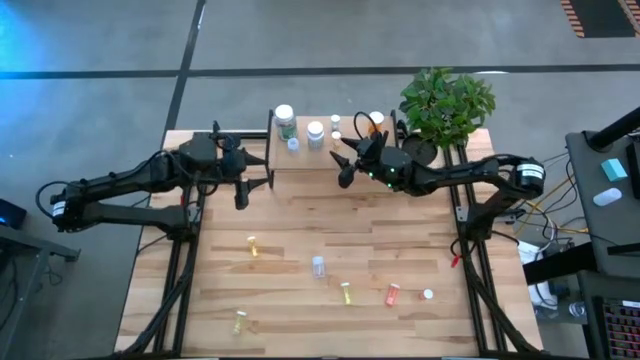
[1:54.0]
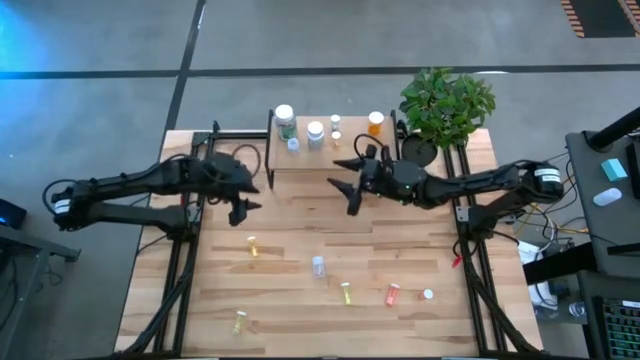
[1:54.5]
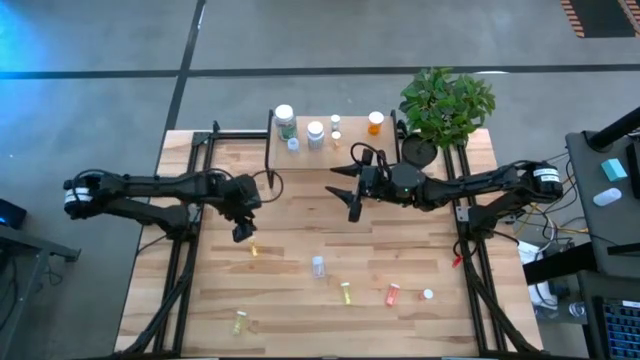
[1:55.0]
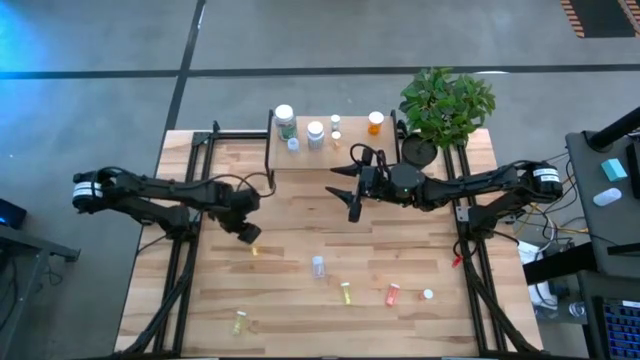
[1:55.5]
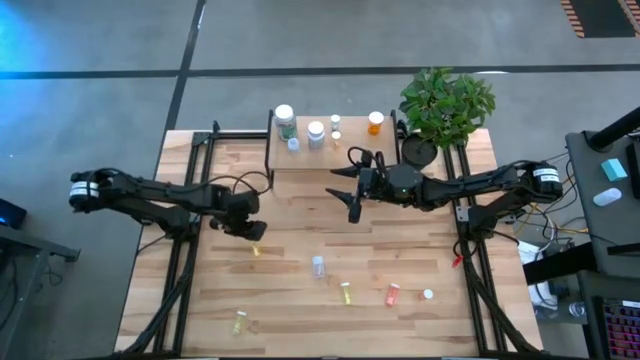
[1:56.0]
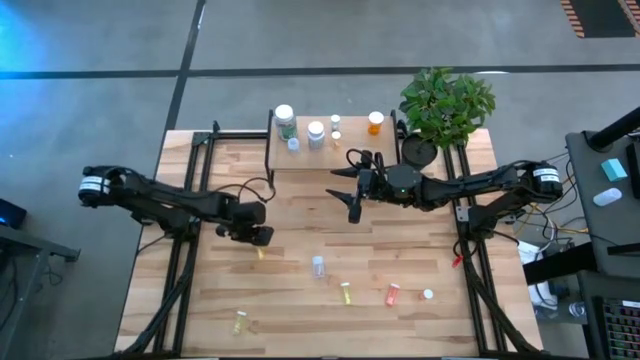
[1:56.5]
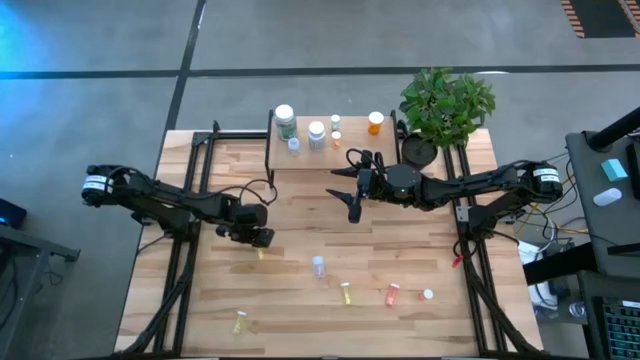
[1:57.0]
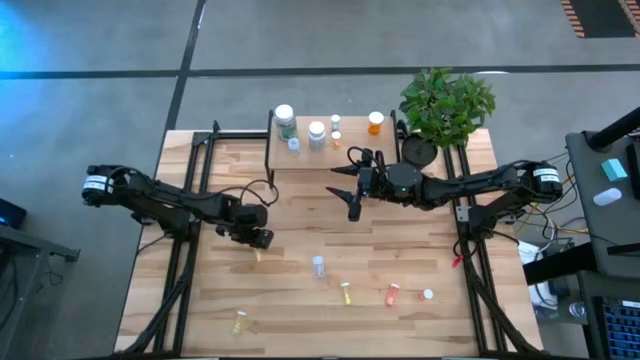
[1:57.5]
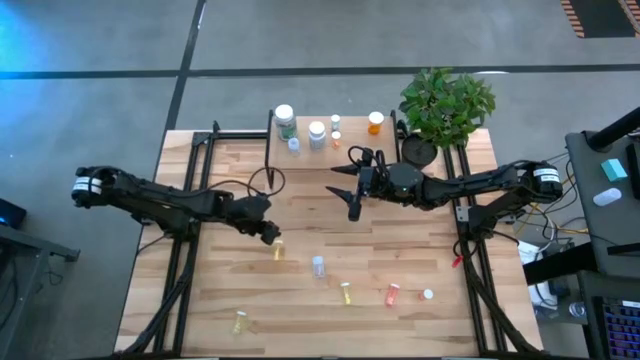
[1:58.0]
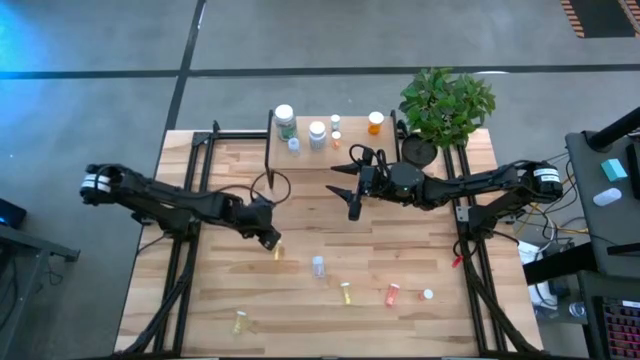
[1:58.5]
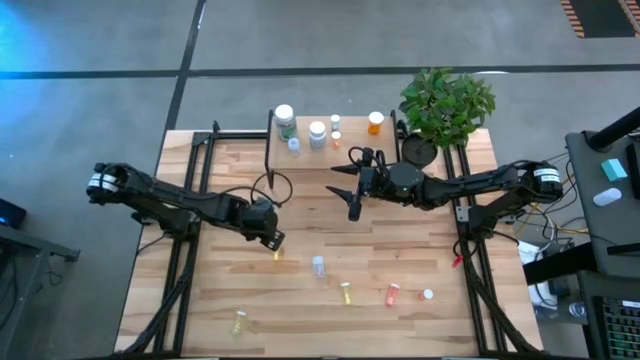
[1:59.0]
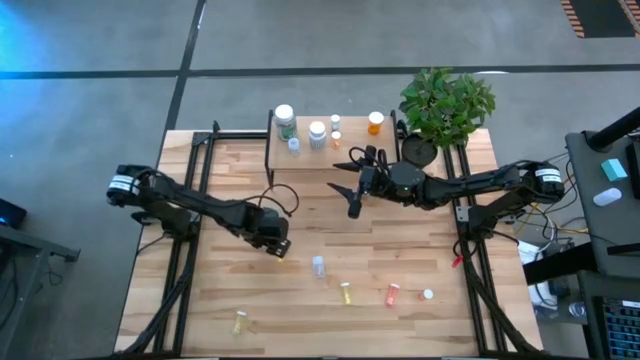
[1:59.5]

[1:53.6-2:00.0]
Task: Pick and place medicine bottles onto shelf by color
Put the yellow pill bottle on the shelf

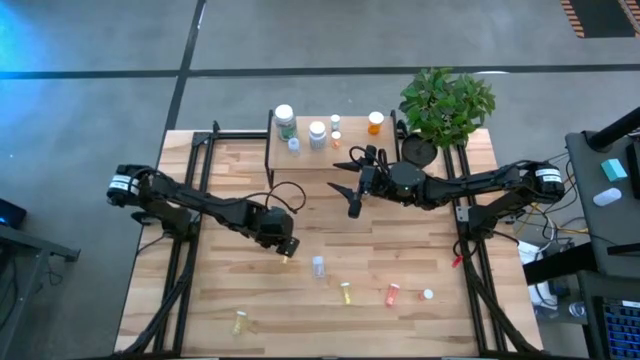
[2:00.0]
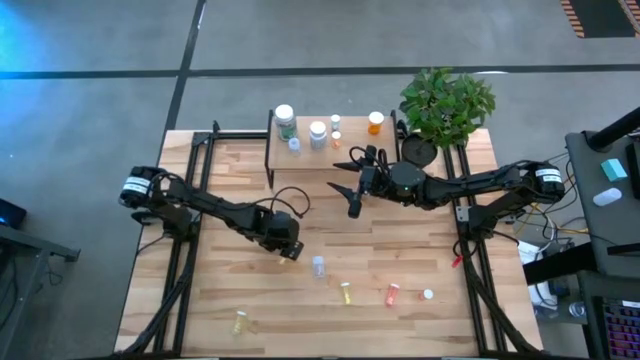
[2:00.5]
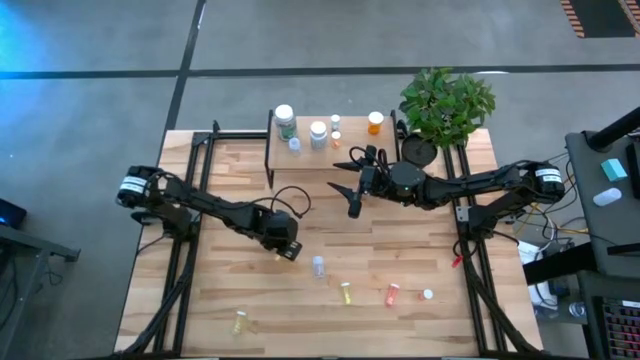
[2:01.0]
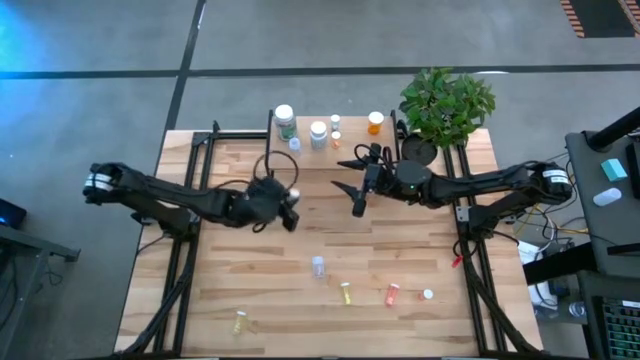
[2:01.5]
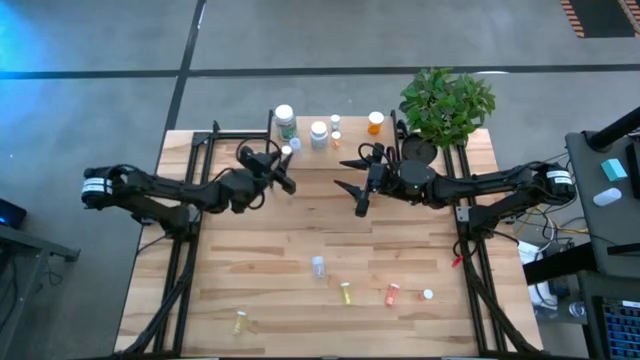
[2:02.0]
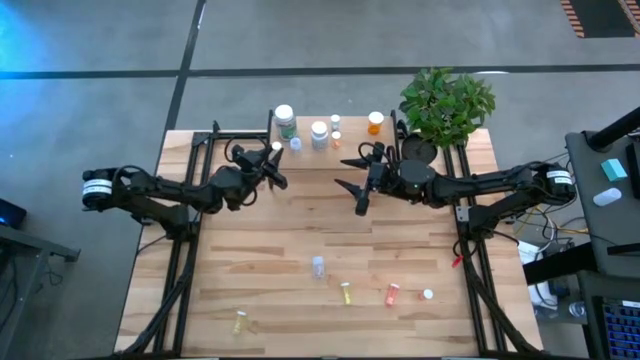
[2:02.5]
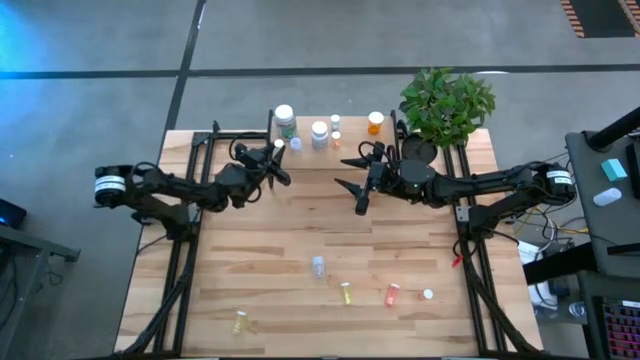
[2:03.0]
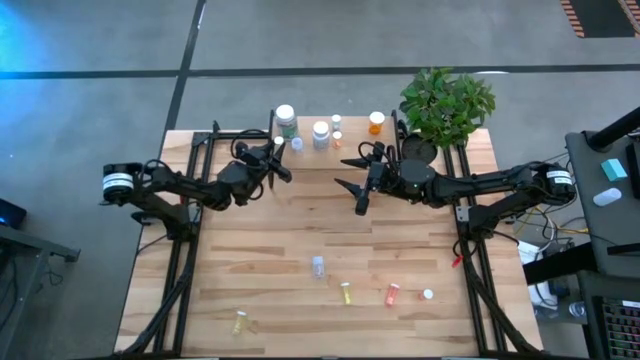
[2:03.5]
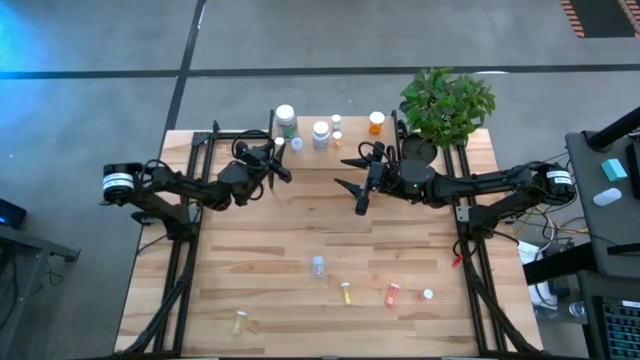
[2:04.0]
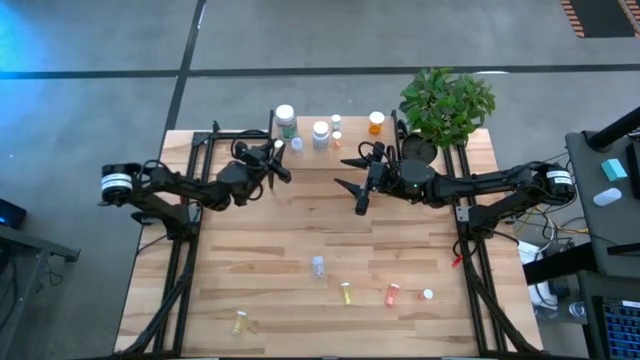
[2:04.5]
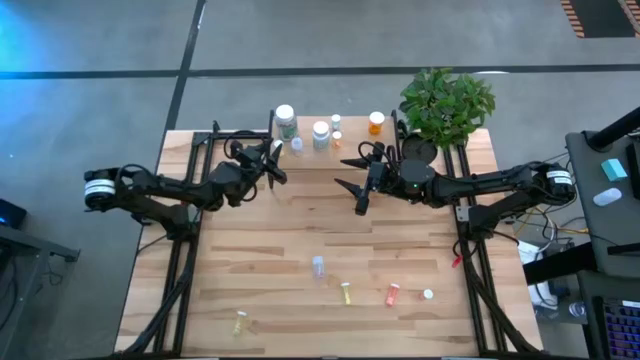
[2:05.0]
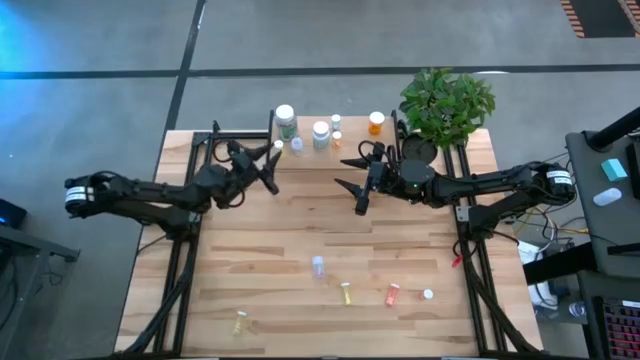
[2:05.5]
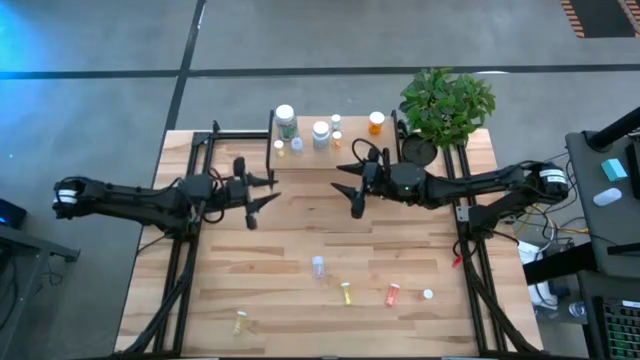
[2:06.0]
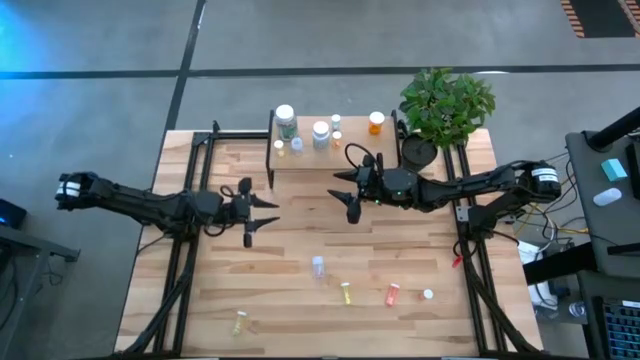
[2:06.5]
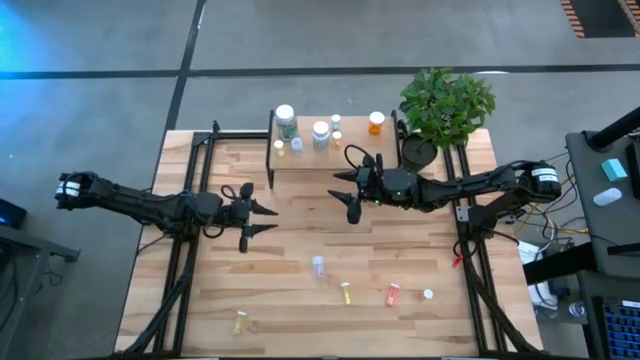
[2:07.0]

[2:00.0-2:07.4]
Put the yellow pill bottle on the shelf

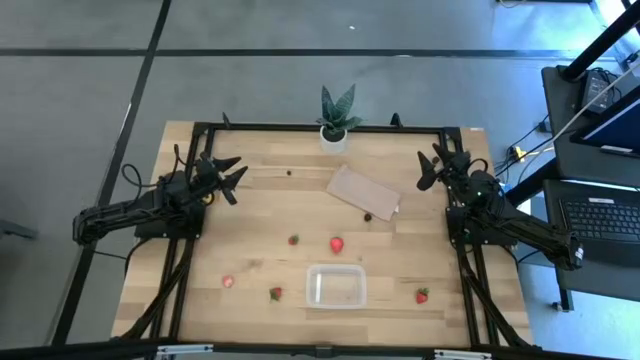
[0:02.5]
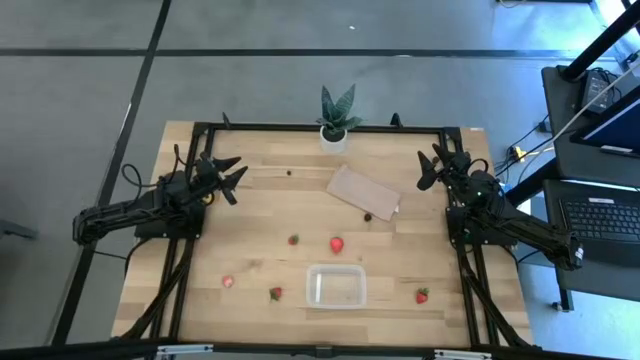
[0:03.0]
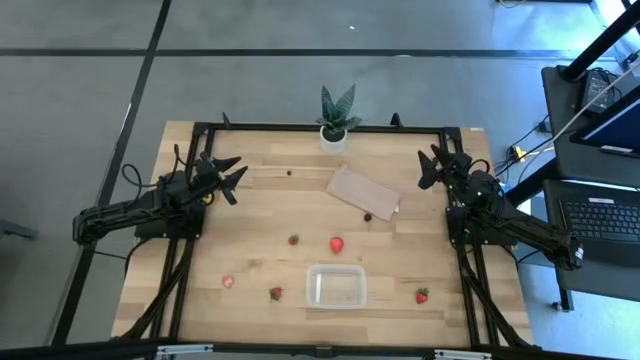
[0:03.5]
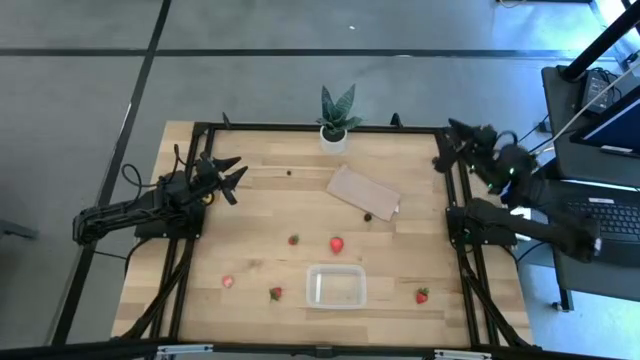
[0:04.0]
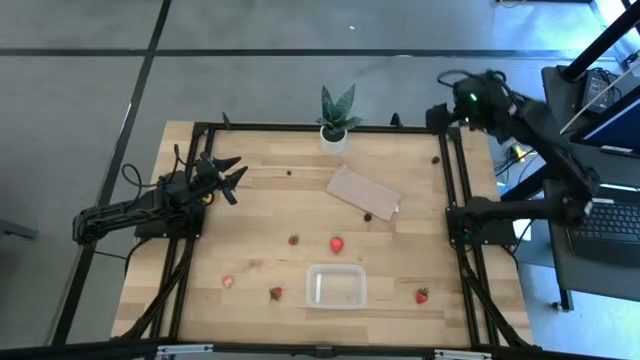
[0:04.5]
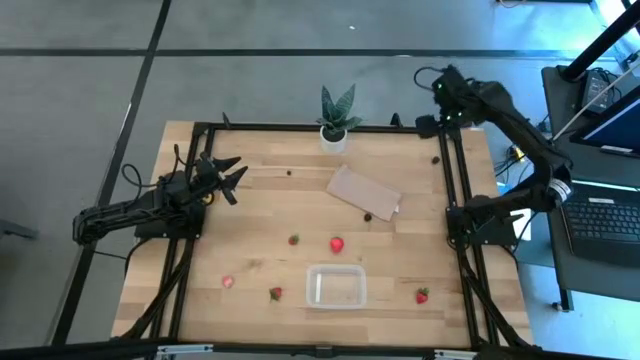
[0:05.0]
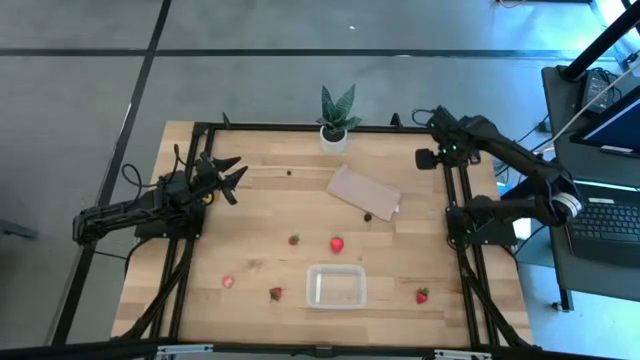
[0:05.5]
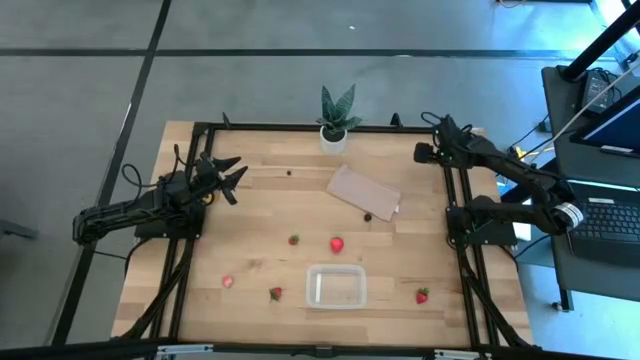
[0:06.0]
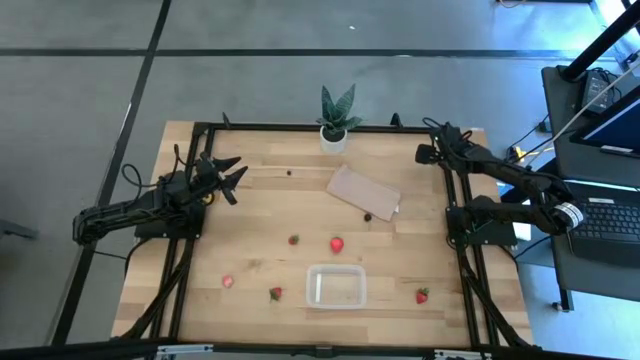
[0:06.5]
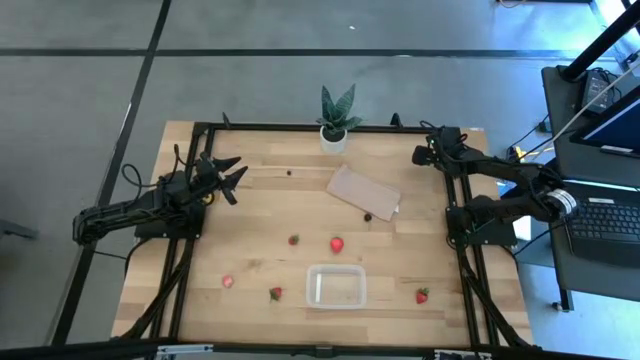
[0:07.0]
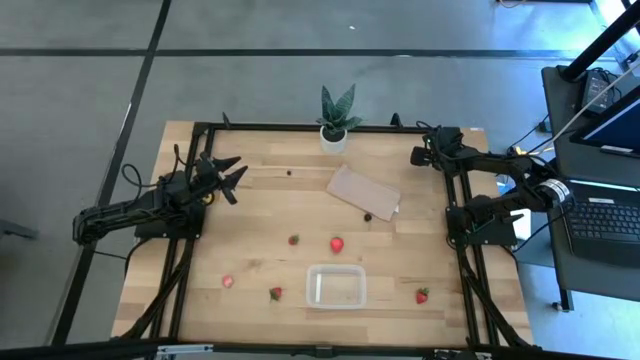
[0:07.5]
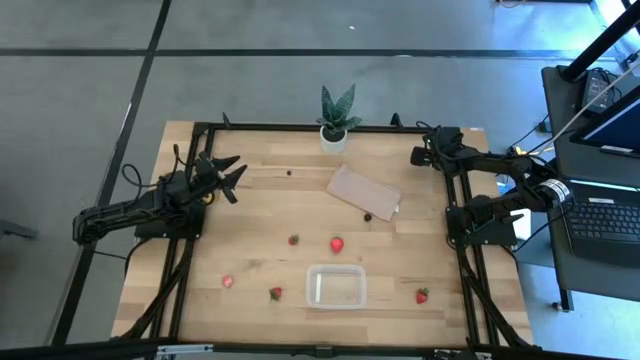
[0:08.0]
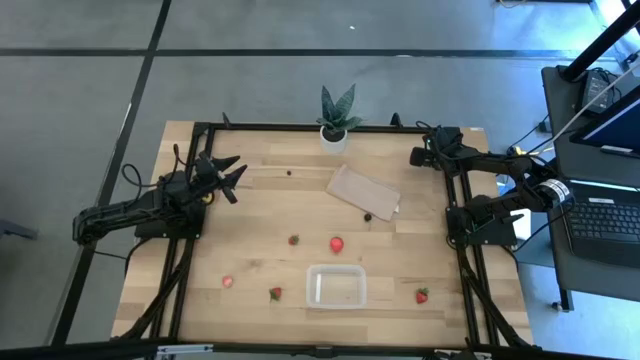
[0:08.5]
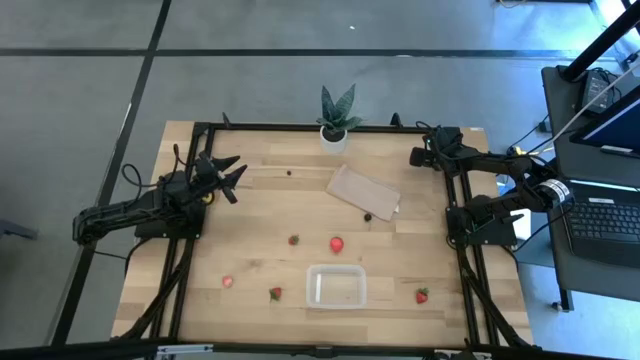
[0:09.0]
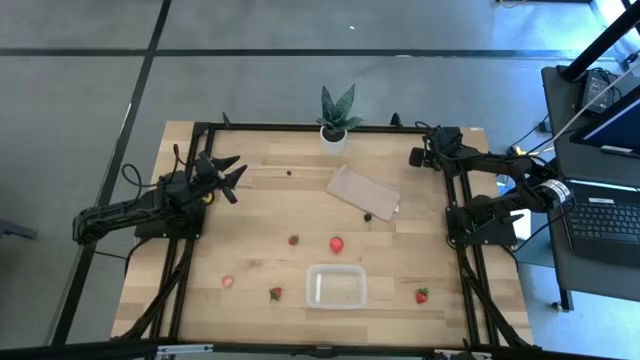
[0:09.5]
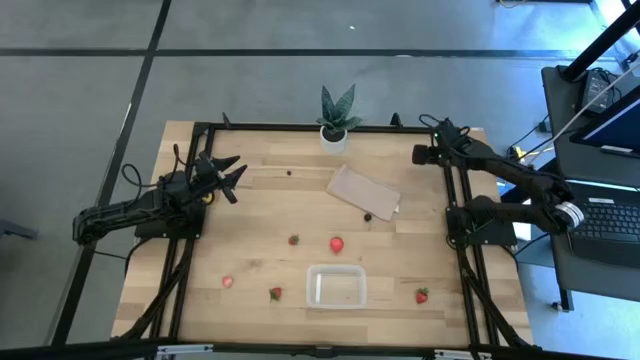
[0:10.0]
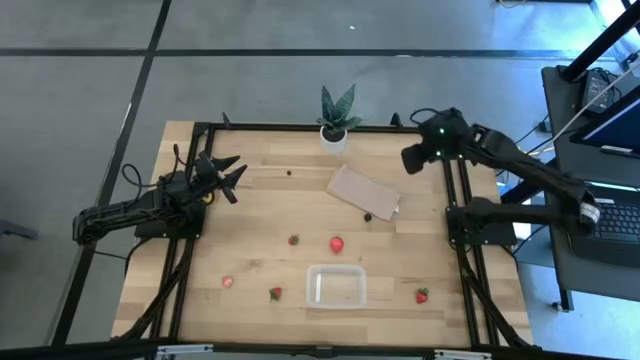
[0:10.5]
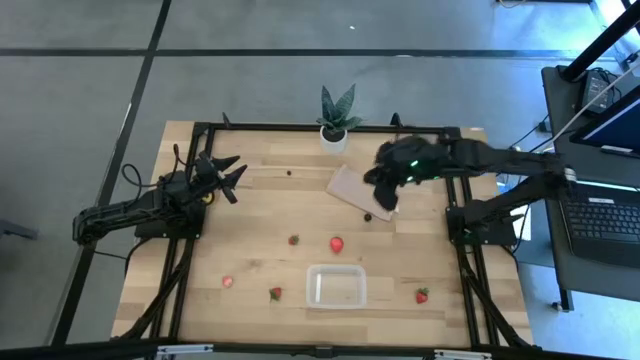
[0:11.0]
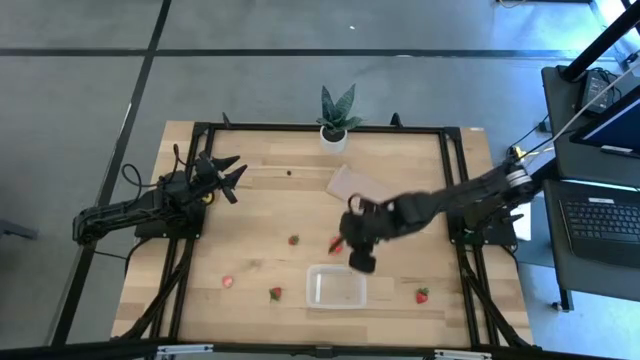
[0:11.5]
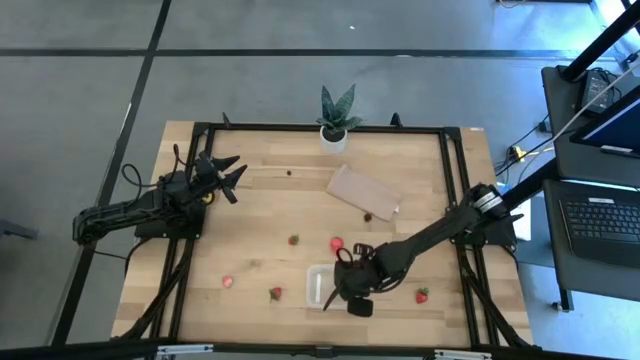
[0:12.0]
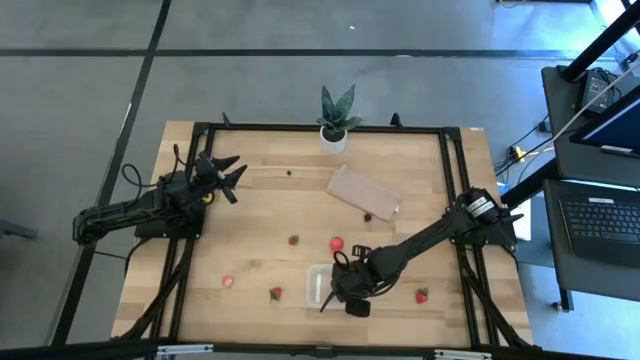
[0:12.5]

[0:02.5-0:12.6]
Task: Pick and placing Produce into tupperware
Put the blackberry in the bin
